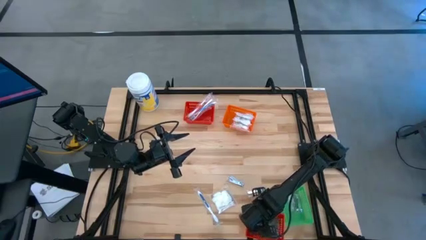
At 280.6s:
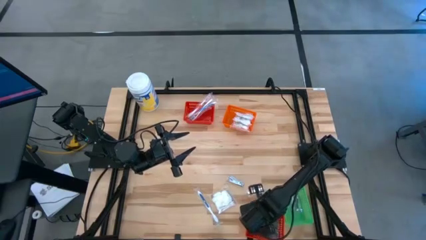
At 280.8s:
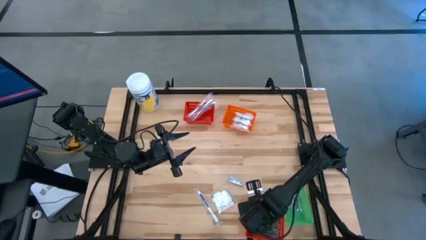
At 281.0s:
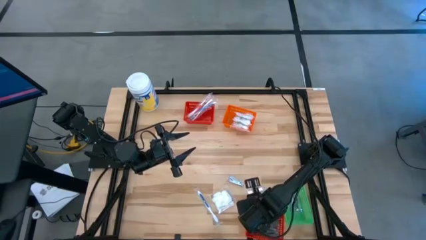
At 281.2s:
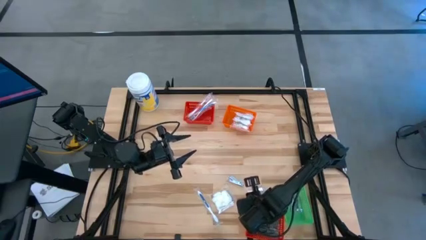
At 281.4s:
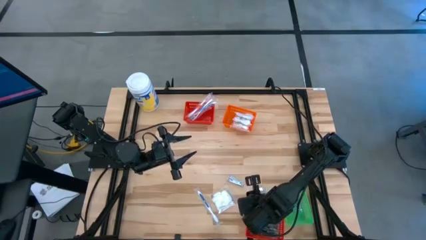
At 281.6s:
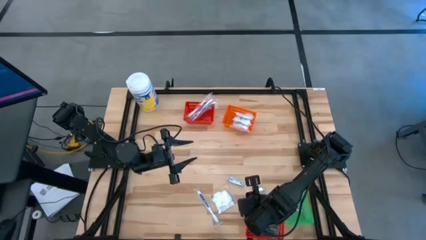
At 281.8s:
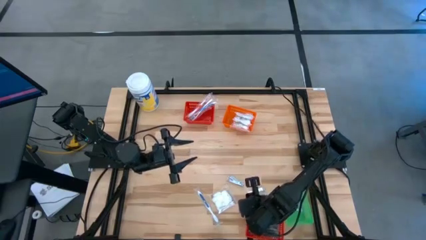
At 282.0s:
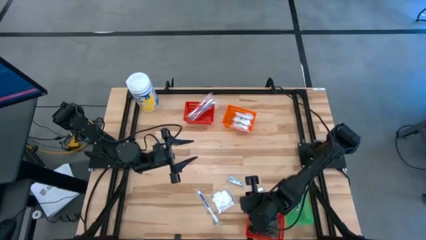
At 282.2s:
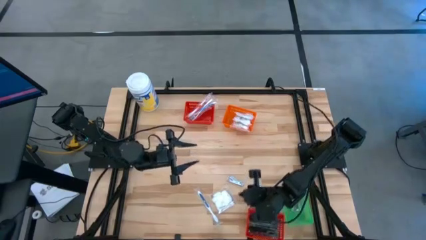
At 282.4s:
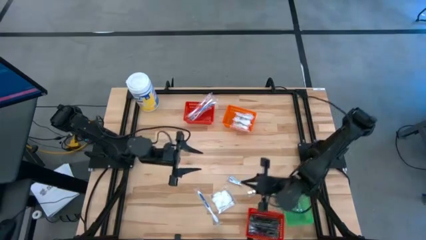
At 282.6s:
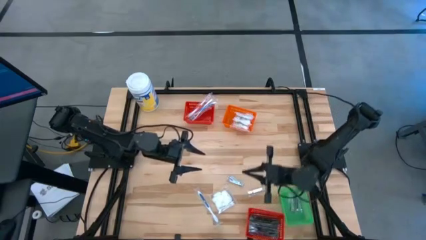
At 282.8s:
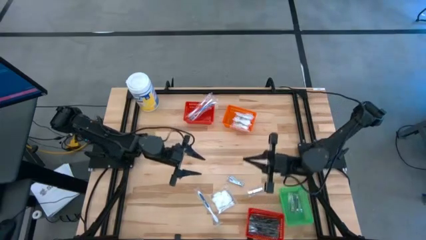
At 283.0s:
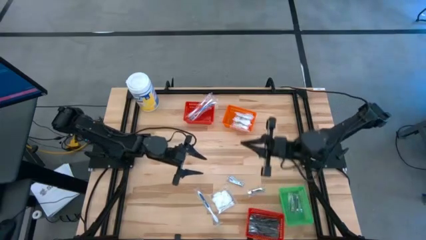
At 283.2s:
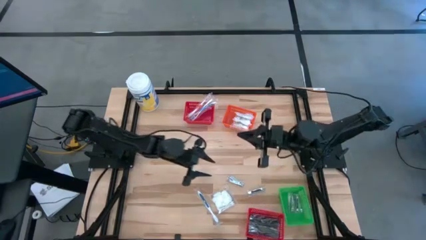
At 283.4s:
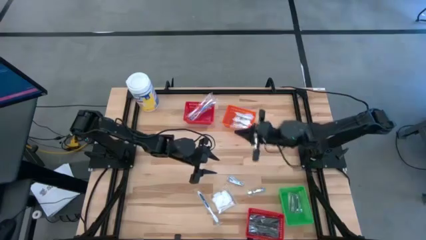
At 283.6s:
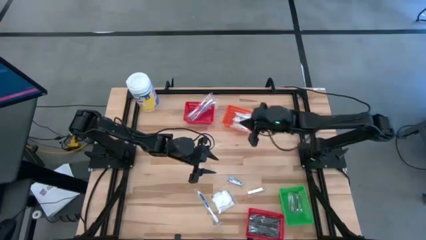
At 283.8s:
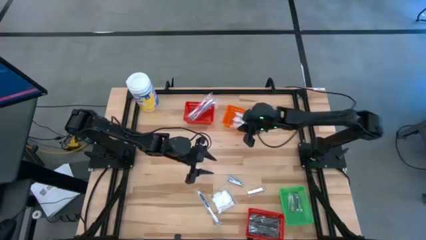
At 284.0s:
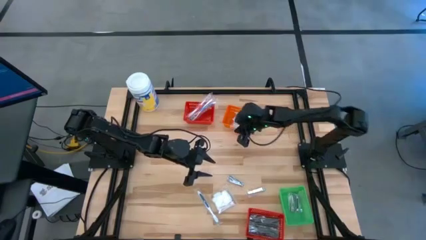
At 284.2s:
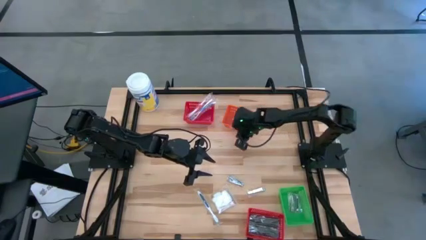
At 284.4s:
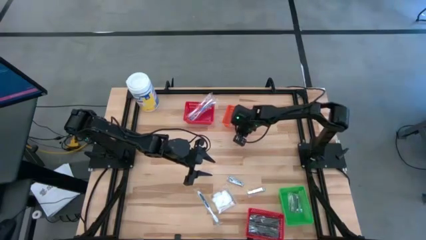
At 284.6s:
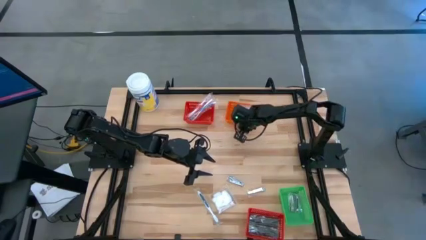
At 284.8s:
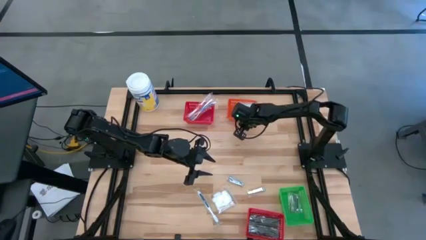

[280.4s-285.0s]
Task: Pick & Place Travel size toiletries
Adjust the orange bin

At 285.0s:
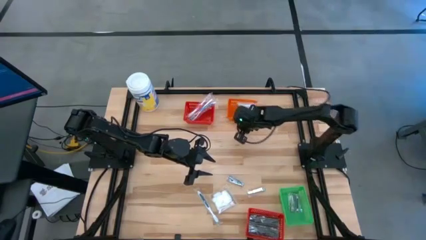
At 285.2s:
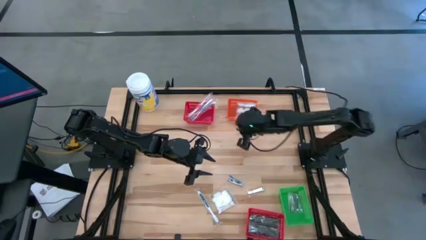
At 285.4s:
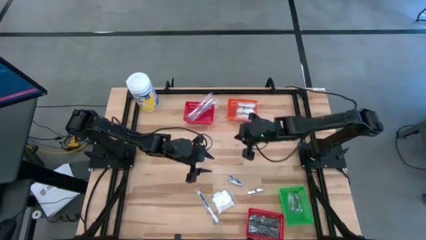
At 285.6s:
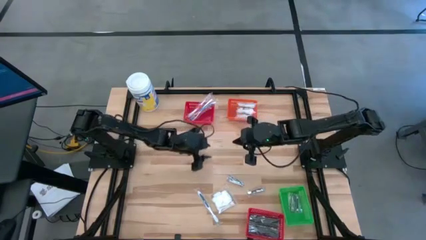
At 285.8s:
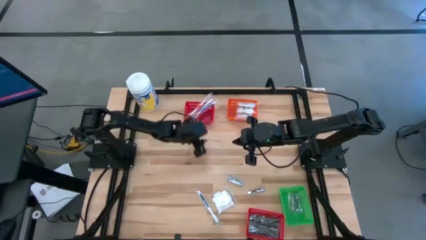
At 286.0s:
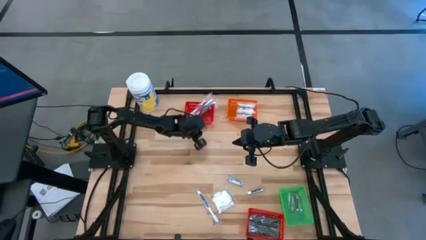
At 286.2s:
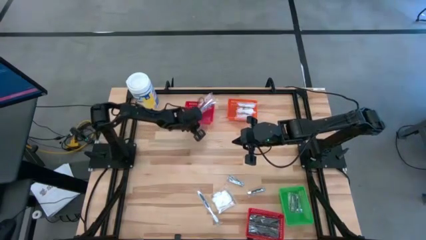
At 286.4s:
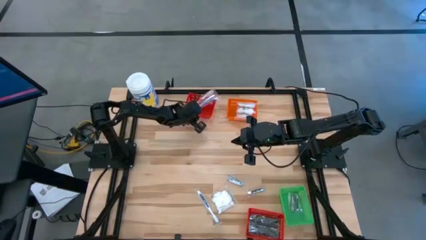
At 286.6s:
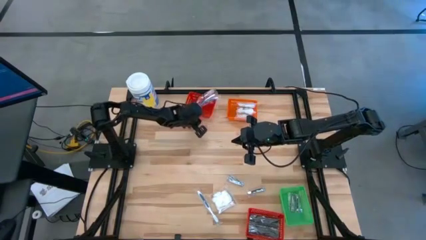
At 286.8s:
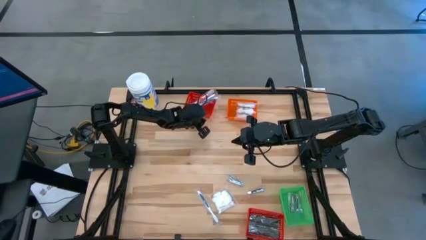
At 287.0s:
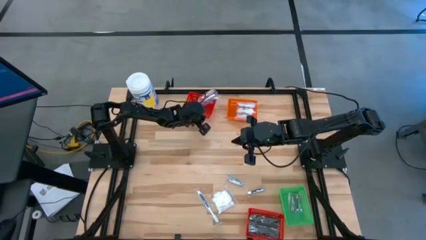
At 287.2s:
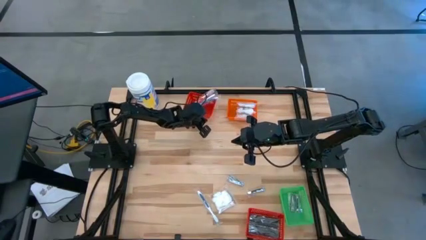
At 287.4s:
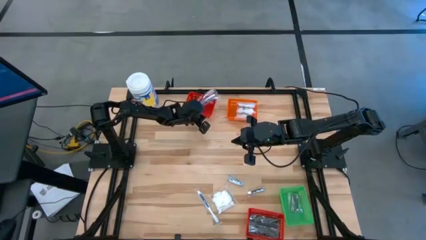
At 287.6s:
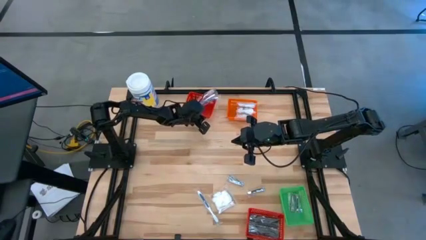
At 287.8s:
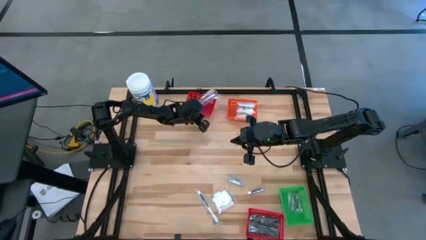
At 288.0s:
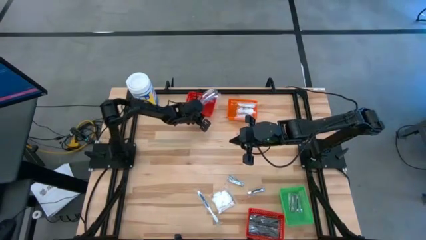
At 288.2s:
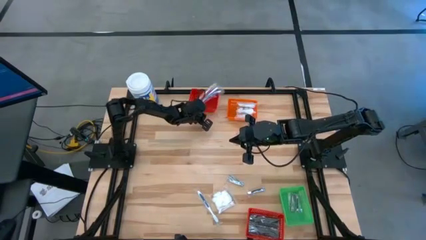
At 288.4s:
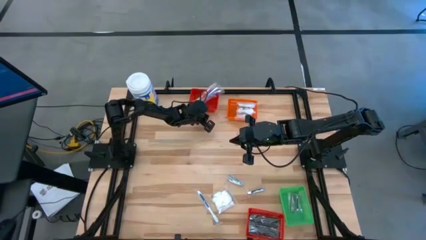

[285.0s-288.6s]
Adjust the top red bin

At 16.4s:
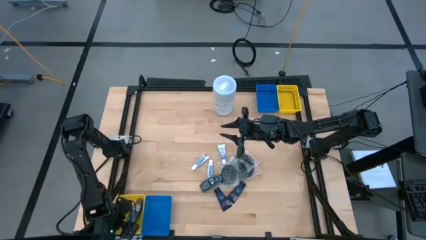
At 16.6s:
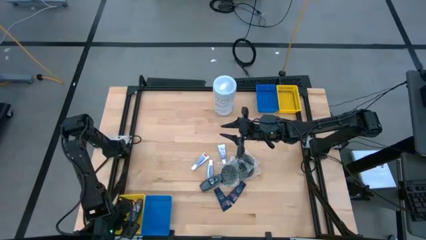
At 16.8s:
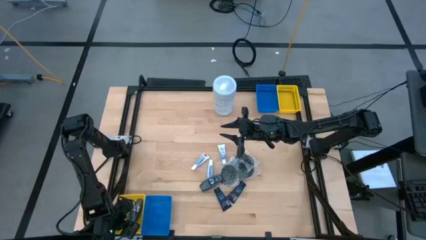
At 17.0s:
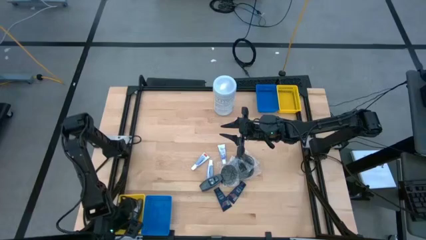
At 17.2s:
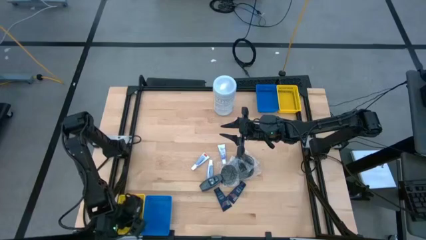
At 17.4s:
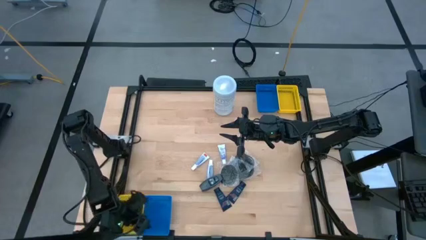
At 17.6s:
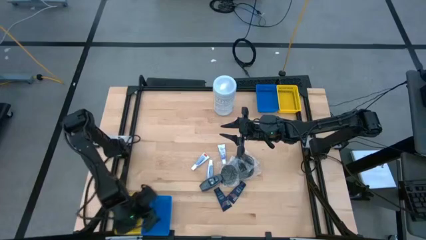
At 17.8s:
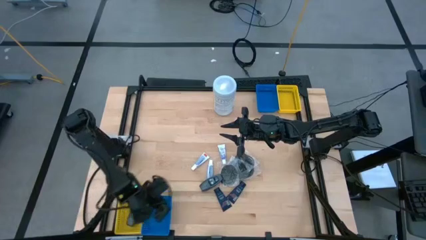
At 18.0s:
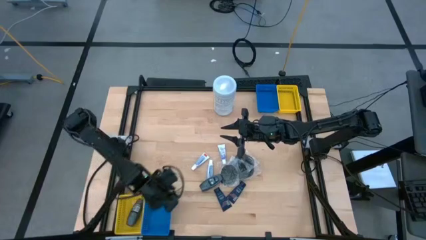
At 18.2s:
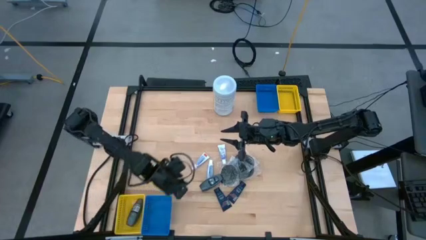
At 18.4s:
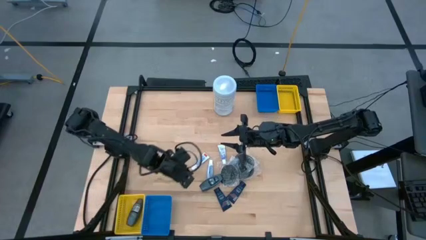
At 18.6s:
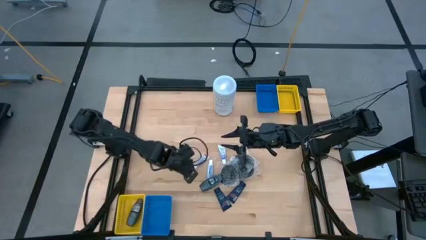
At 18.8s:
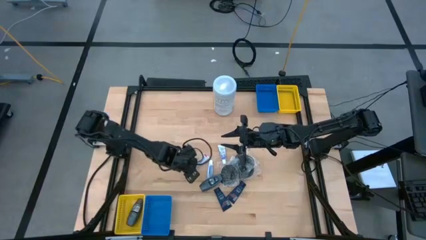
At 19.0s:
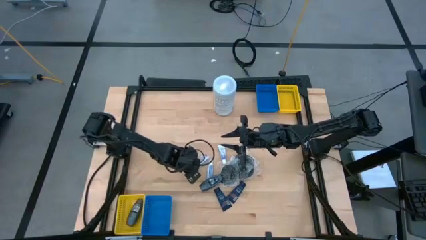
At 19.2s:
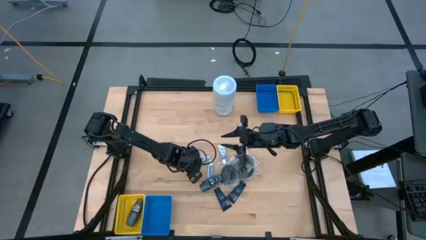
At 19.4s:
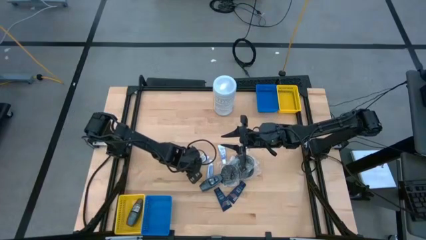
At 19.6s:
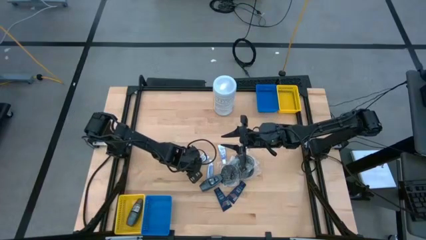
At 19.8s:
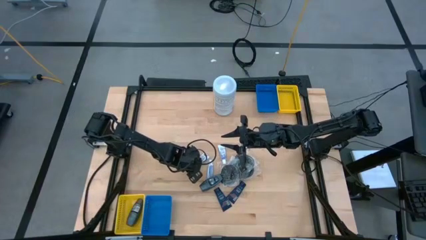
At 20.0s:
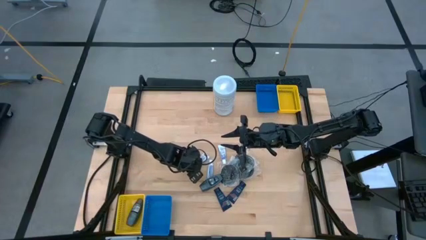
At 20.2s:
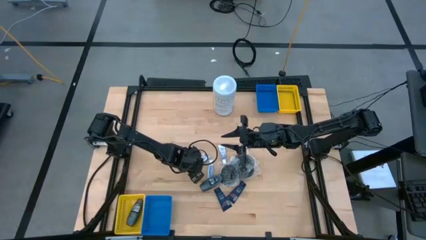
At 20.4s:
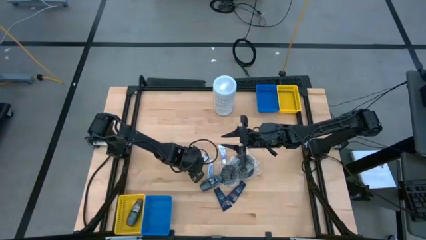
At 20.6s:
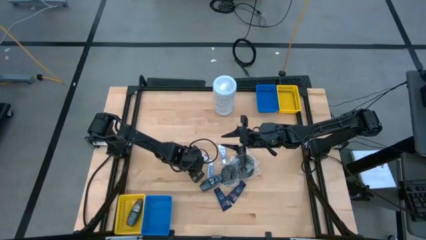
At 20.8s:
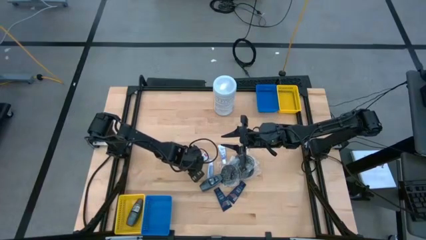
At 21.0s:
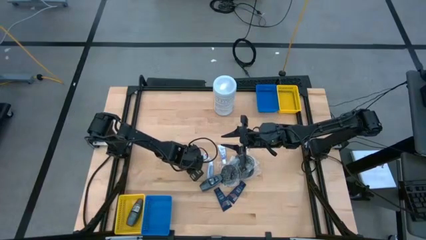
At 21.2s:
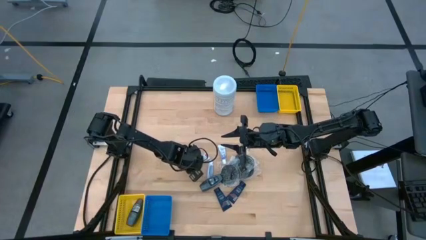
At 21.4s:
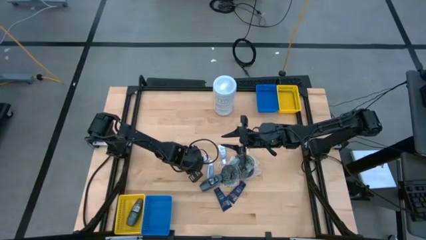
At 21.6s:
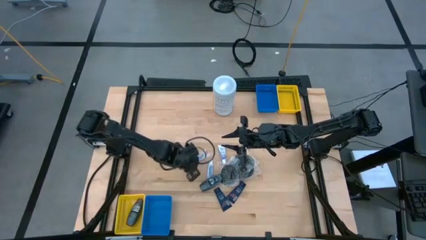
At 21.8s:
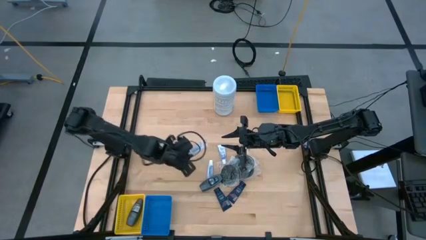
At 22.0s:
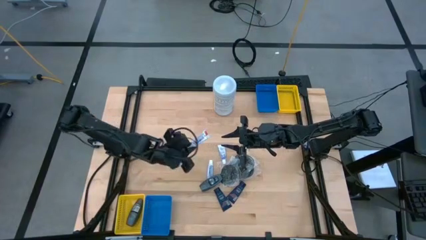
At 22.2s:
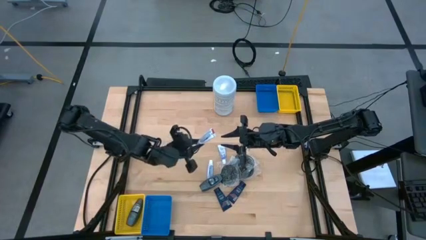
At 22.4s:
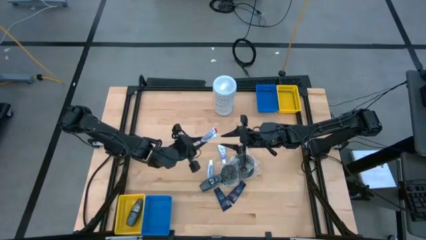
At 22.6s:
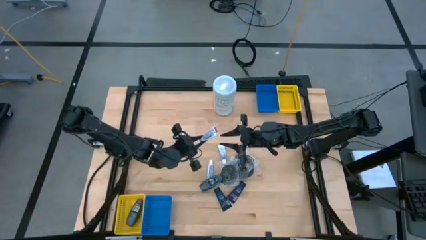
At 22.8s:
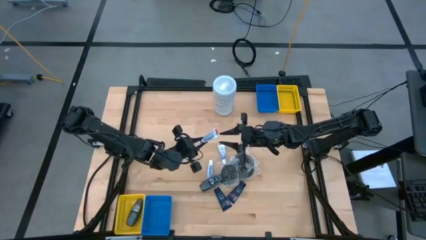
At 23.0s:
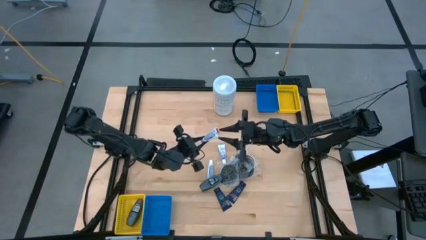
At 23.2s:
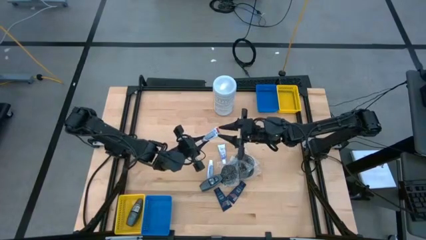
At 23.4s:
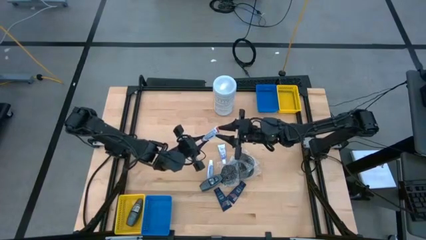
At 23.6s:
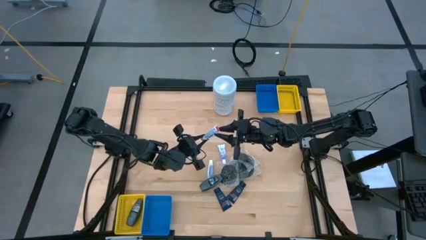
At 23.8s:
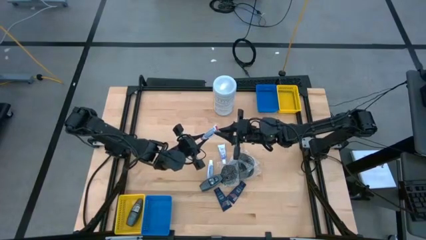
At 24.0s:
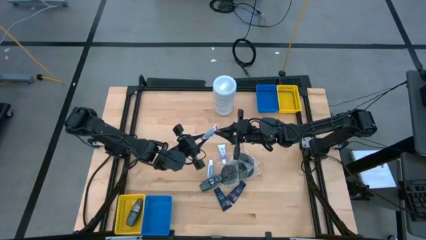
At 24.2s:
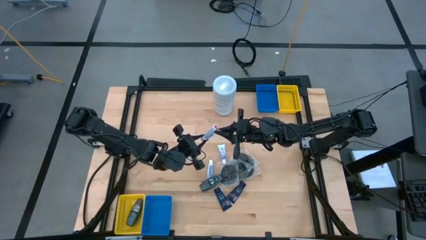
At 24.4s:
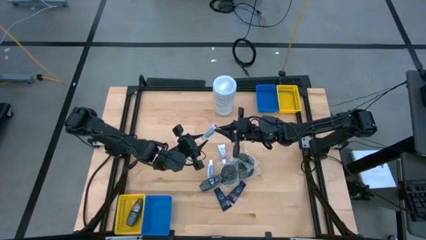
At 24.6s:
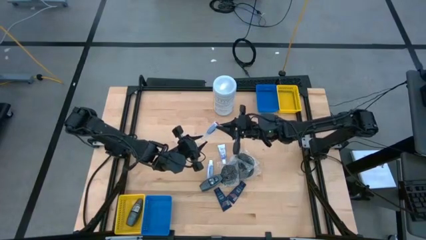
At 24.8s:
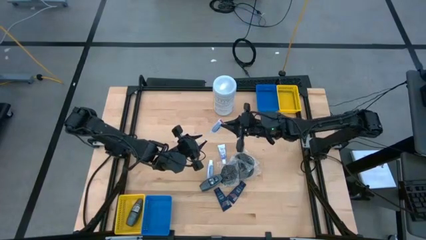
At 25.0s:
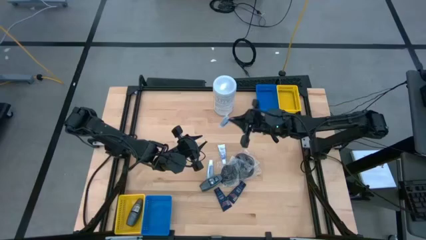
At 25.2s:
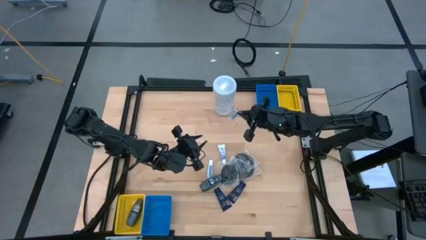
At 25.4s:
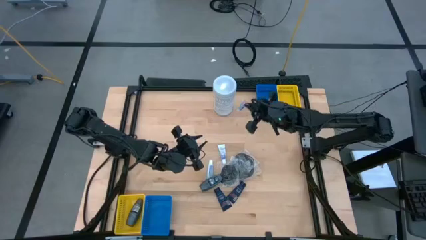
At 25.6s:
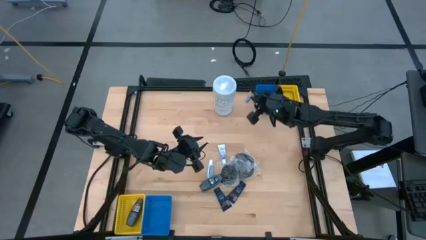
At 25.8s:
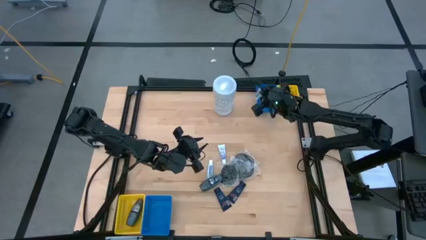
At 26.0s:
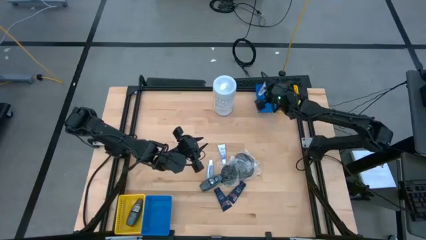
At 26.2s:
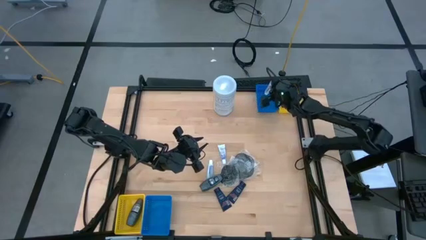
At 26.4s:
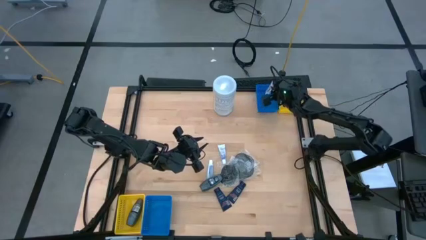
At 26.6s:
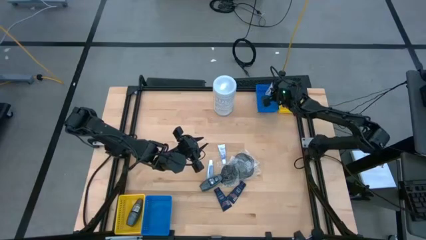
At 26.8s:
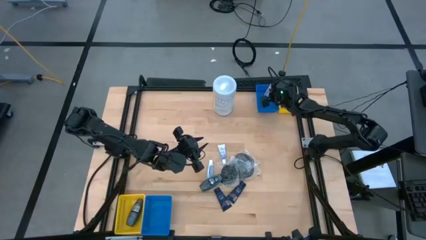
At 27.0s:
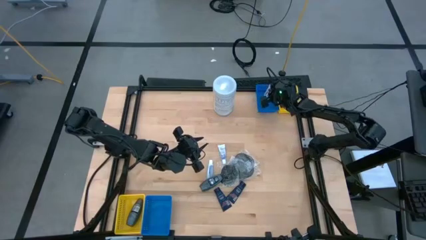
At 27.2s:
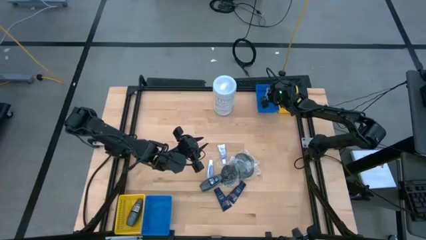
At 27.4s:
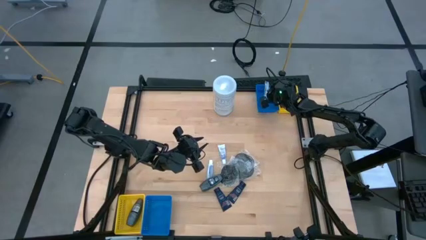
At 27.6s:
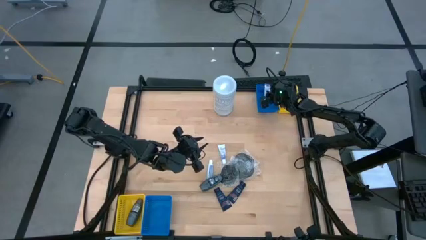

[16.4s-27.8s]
Task: Pick & Place Travel size toiletries
Put the white toothpaste into the top blue bin
